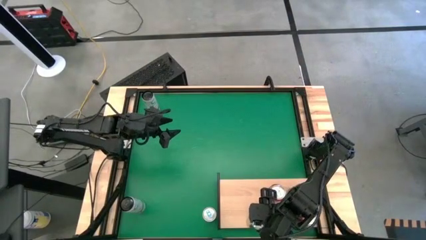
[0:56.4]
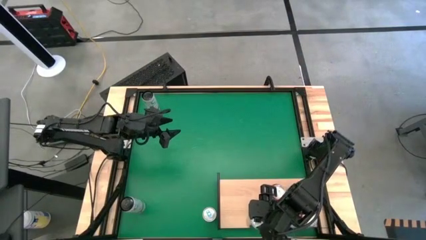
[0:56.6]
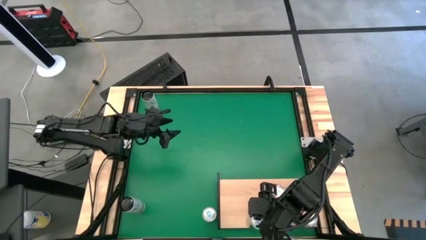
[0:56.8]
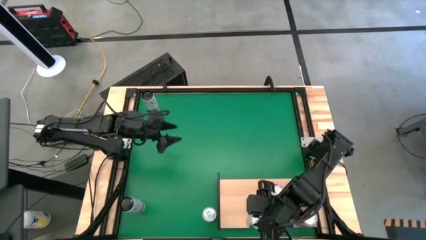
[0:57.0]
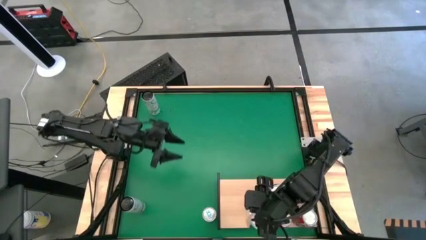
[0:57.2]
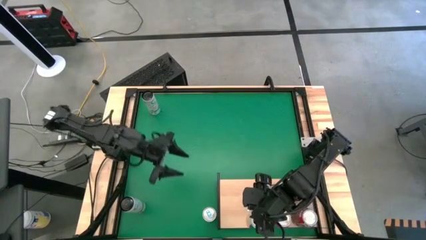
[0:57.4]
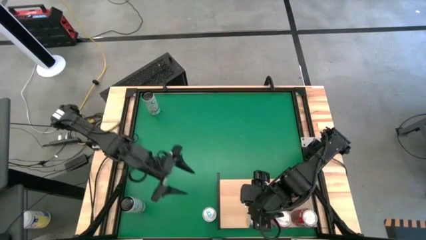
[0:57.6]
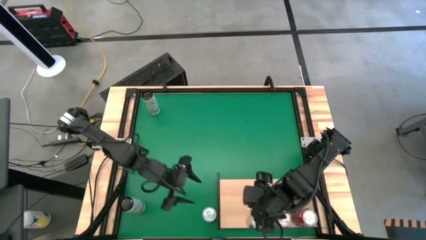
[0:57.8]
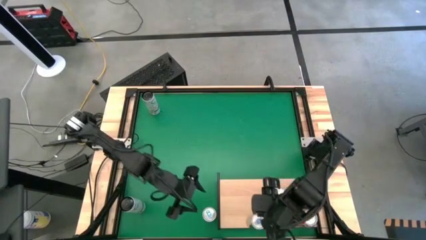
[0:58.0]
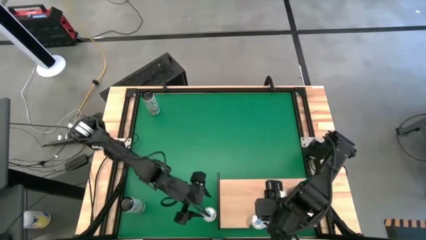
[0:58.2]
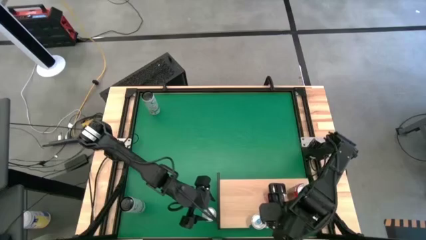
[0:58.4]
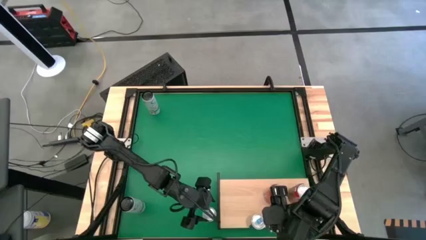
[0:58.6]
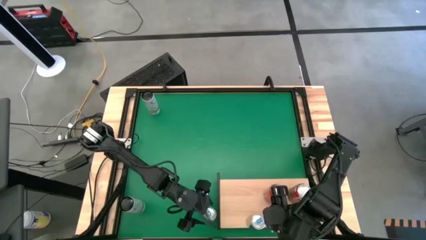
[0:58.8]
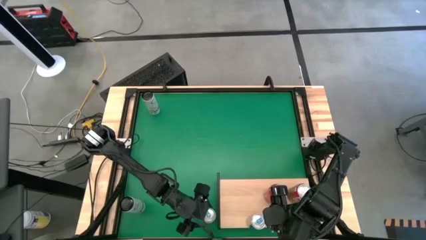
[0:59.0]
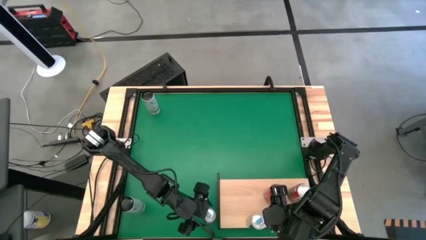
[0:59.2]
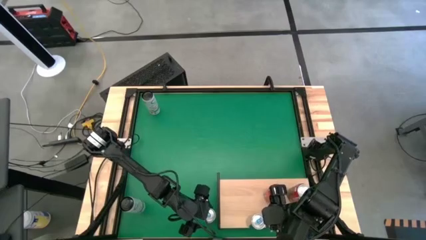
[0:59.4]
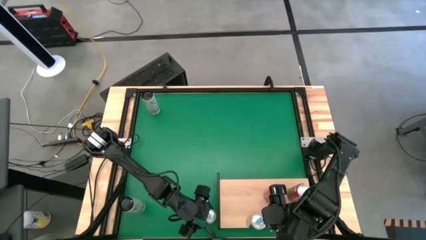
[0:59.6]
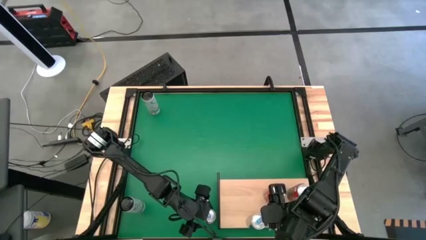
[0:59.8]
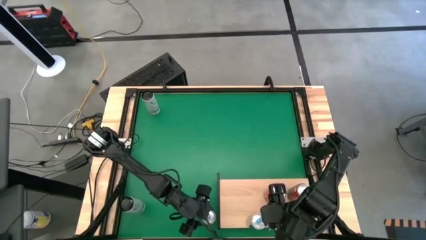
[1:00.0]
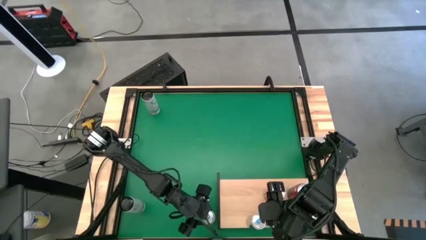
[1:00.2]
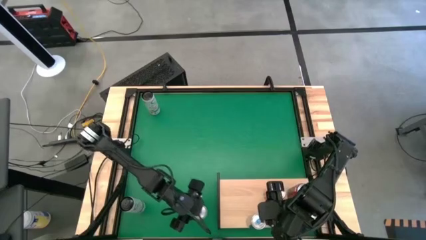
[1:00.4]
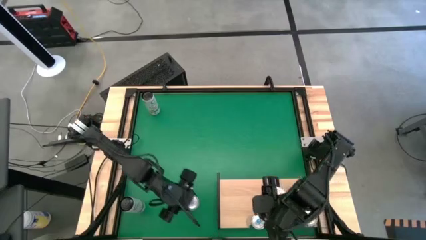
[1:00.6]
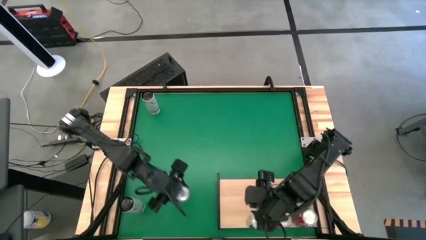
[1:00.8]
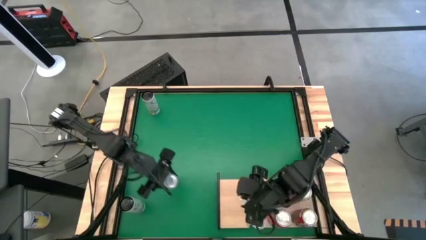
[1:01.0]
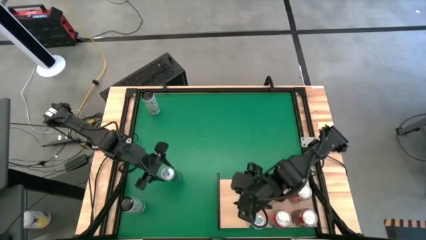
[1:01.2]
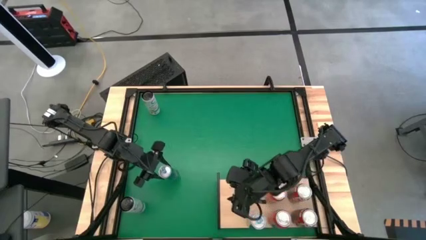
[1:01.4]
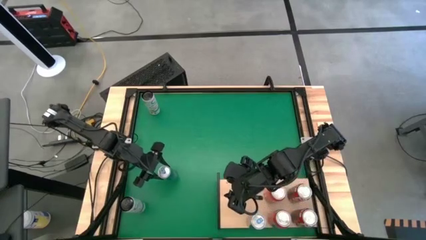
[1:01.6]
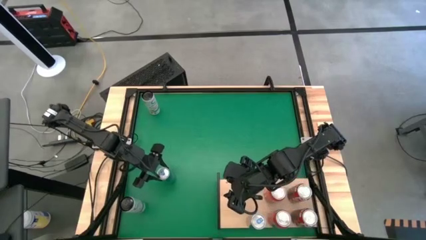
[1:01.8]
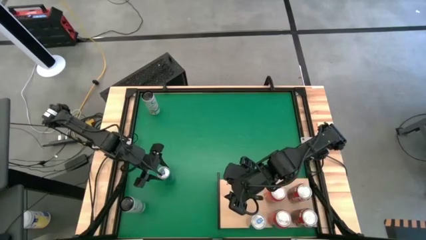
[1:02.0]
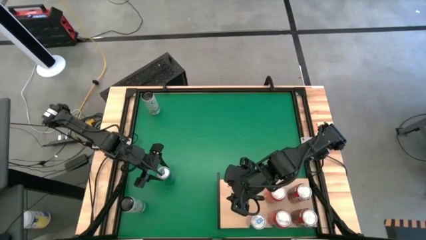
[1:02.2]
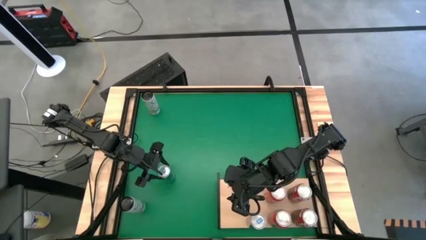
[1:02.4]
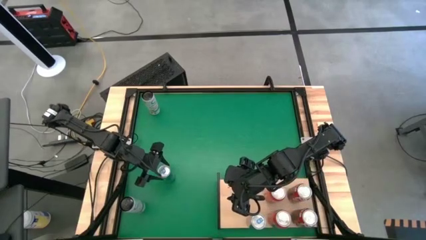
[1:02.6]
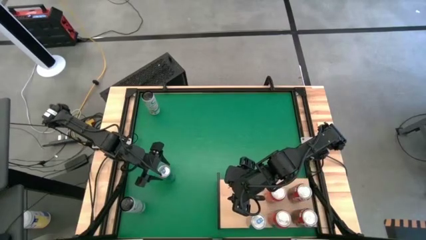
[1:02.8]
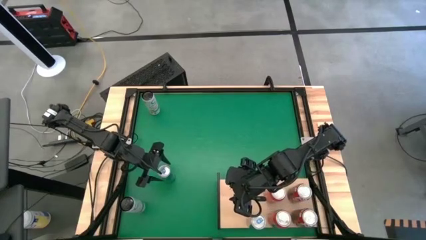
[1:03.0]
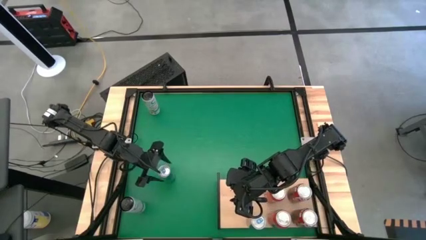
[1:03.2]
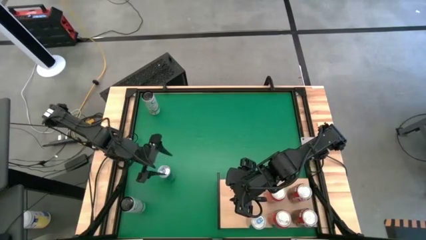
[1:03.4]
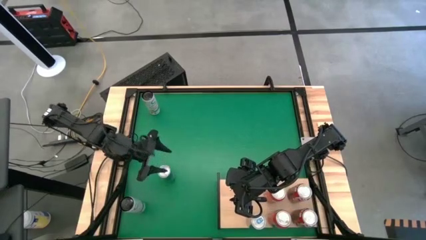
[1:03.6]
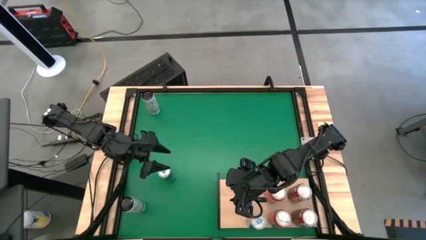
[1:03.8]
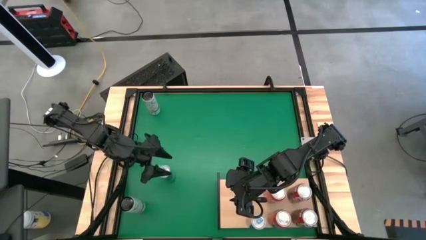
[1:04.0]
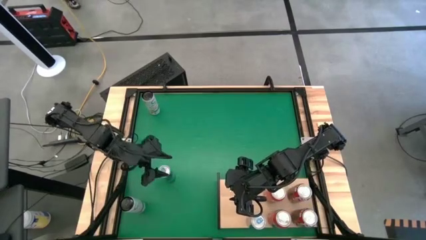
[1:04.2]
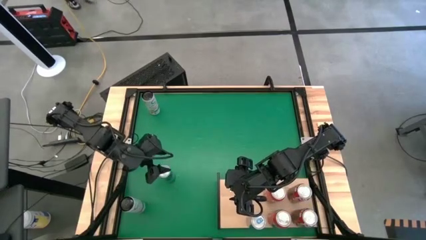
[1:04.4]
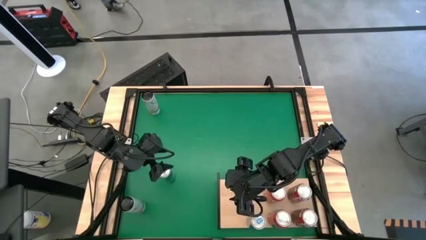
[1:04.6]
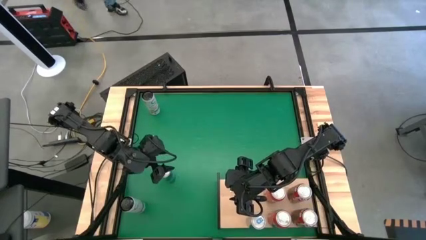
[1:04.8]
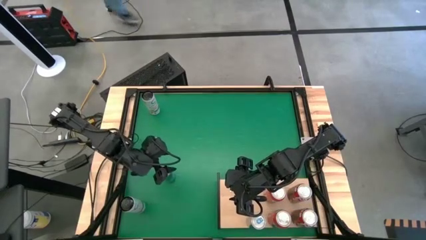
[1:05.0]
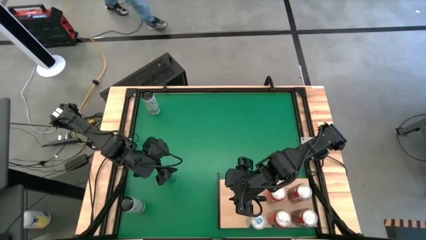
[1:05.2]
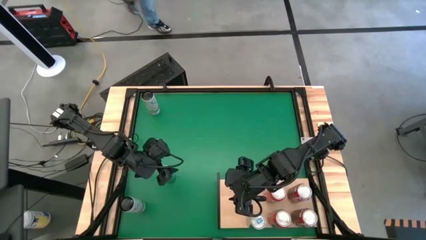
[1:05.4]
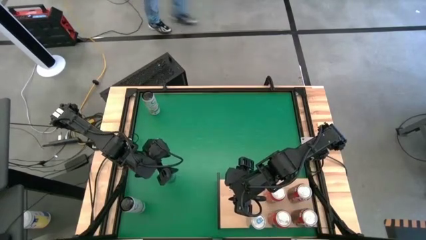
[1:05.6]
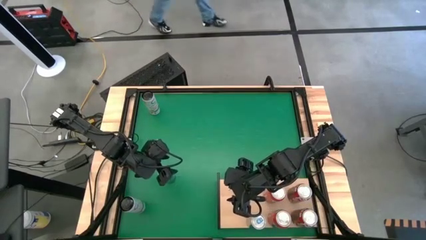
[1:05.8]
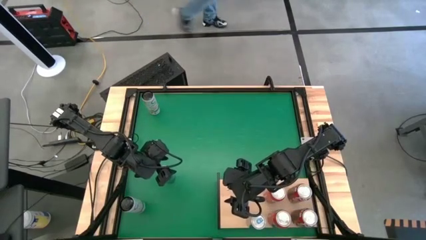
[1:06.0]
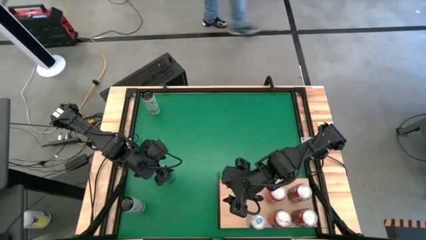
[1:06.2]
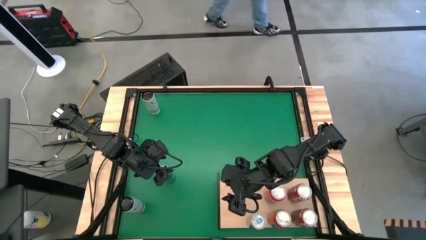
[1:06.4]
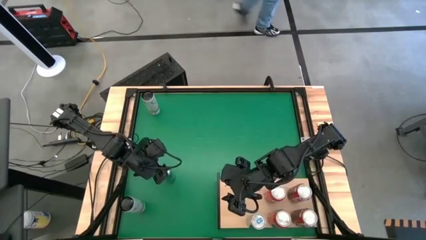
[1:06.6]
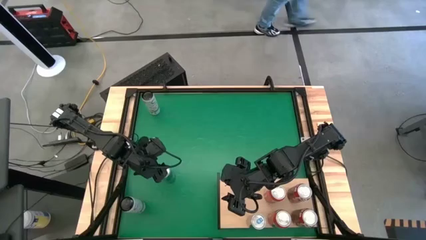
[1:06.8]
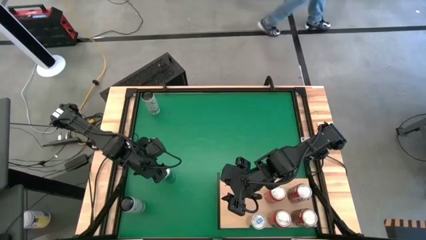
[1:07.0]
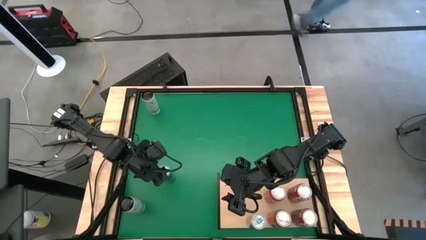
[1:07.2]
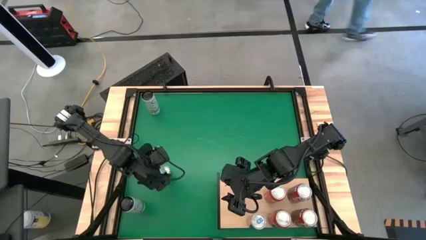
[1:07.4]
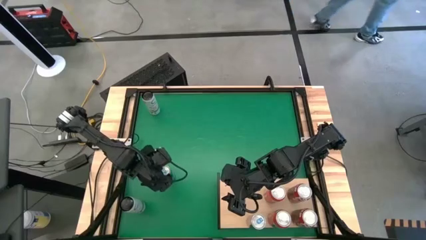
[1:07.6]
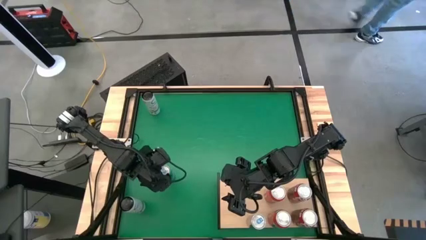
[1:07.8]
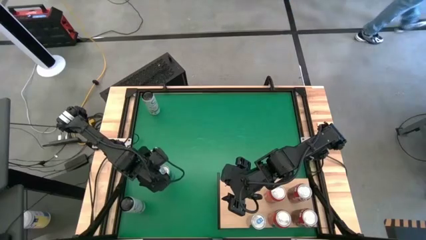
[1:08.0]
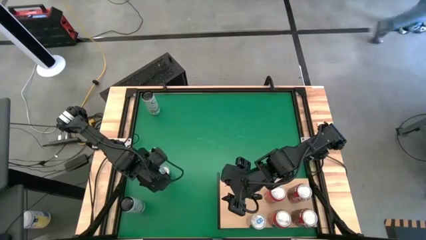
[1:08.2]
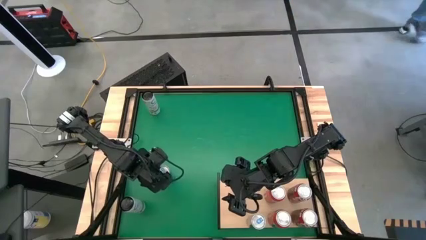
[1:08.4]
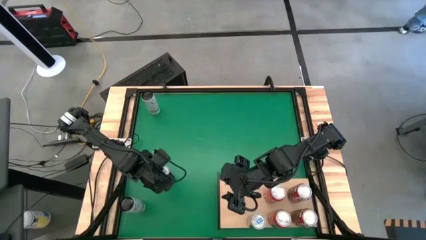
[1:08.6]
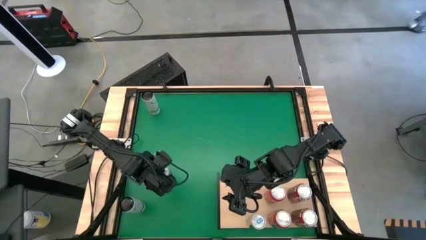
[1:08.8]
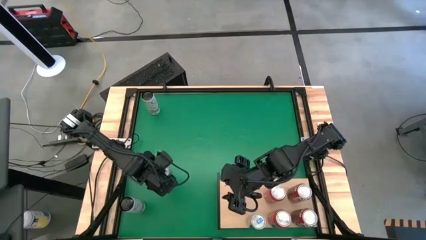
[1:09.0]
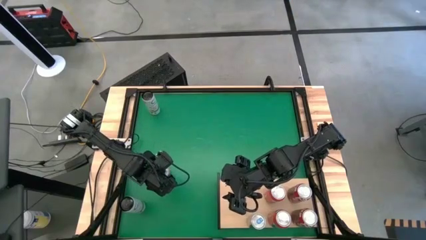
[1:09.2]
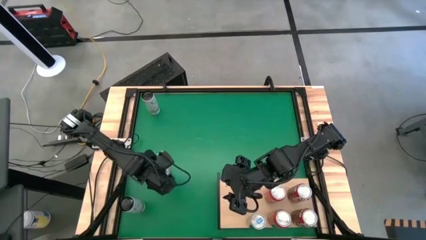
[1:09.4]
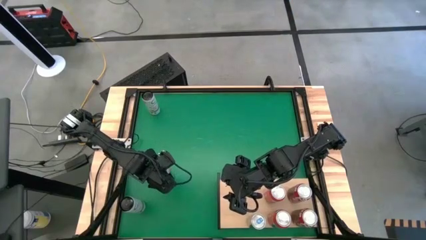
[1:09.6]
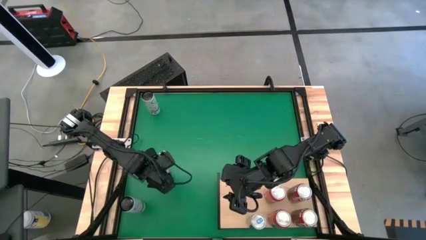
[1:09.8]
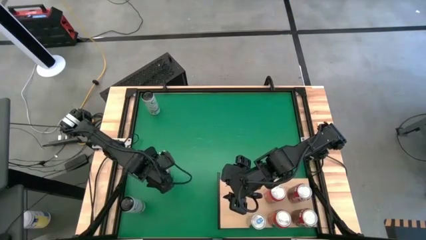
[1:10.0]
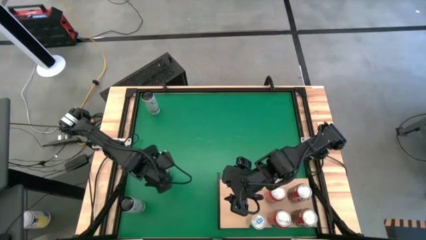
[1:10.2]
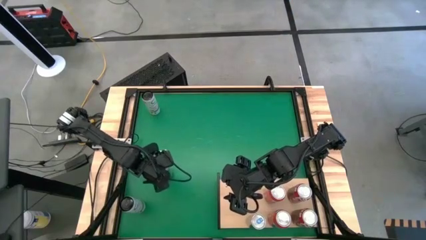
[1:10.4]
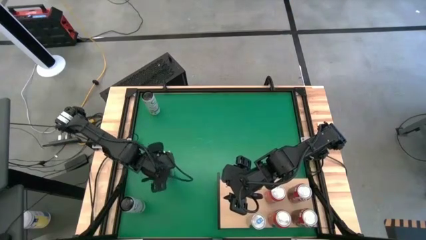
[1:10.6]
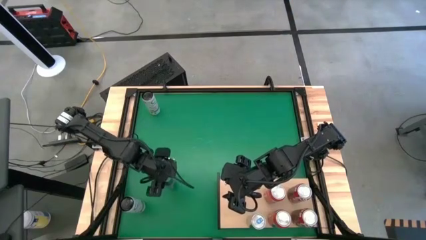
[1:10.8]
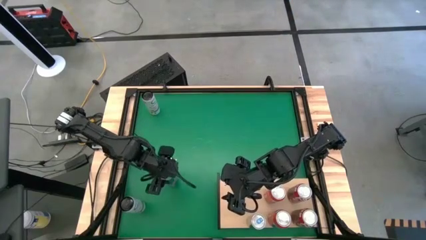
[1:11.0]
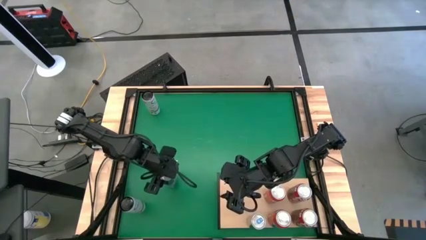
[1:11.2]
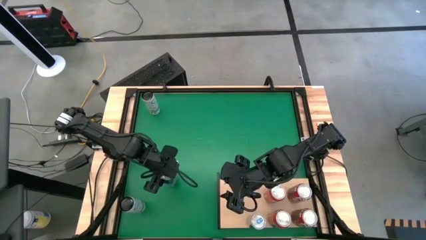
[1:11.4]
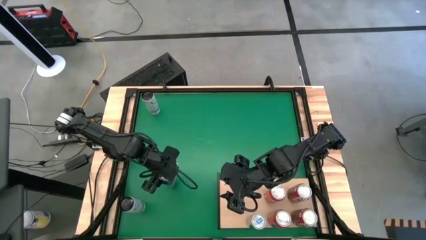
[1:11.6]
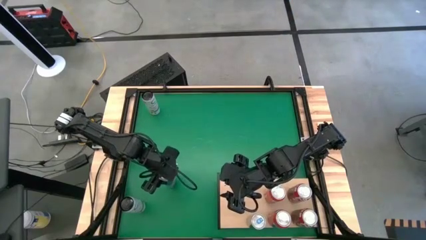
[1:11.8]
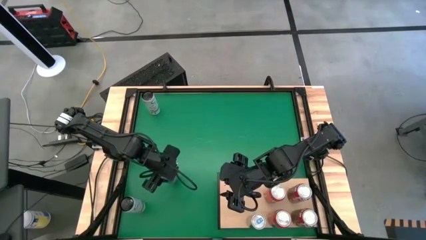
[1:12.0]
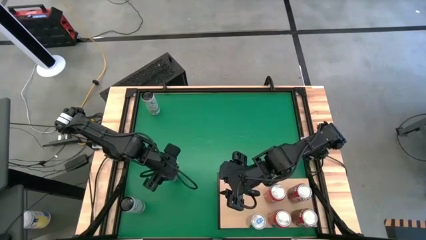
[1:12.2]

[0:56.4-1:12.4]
Task: Place canned beverage on shelf
Put the blue soda can on the shelf aligned with the other blue soda can
